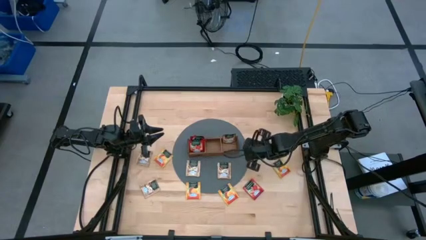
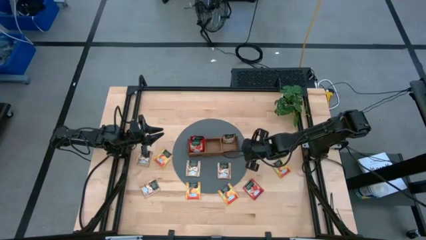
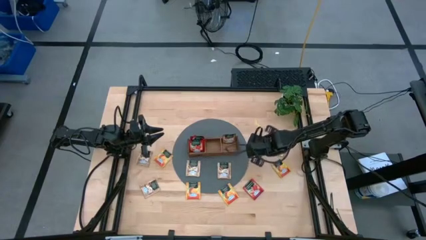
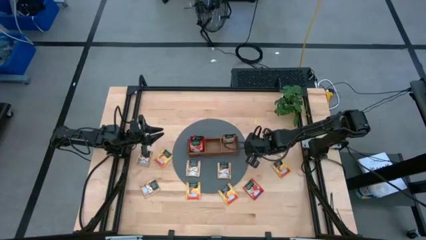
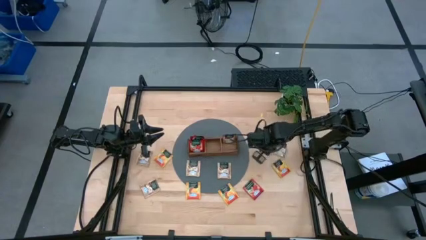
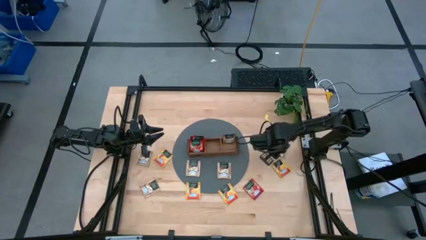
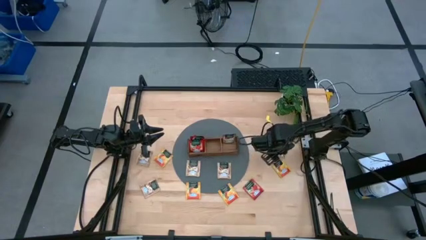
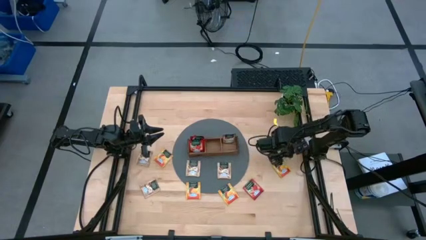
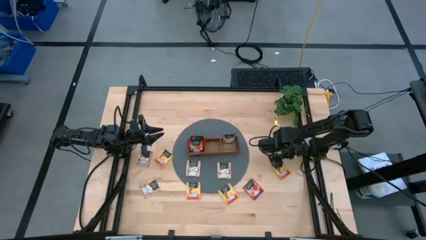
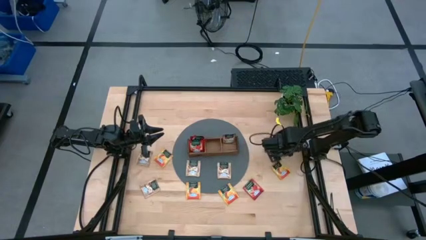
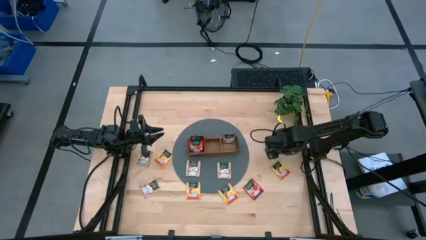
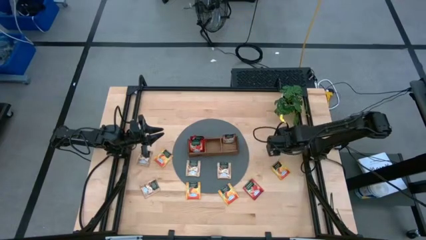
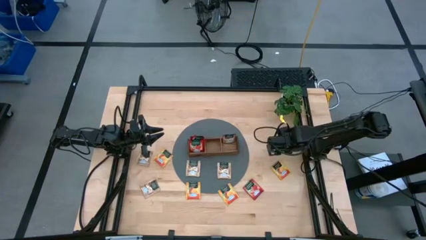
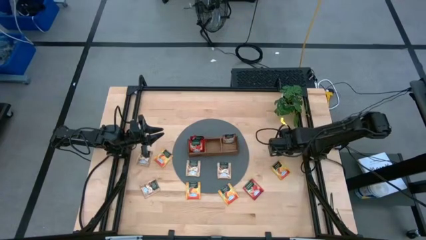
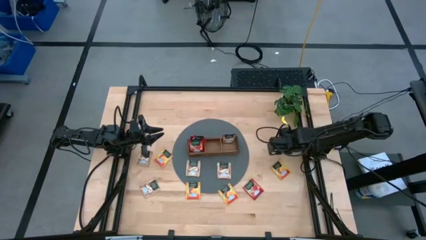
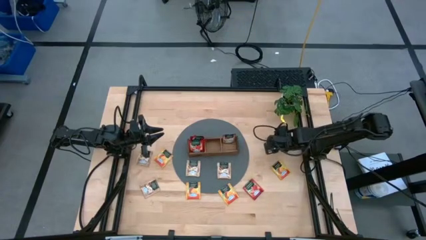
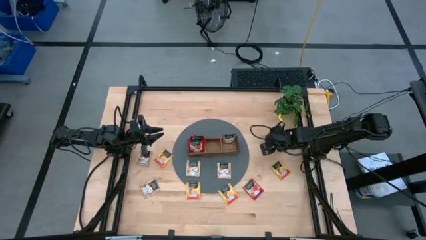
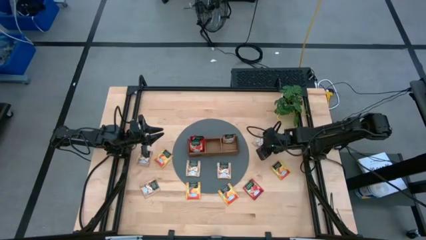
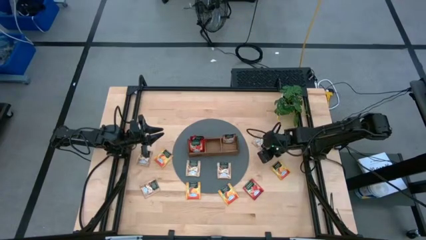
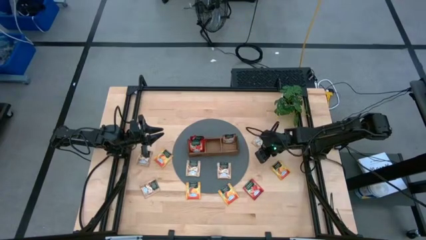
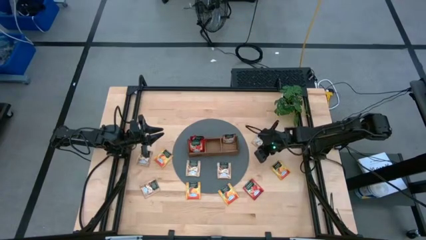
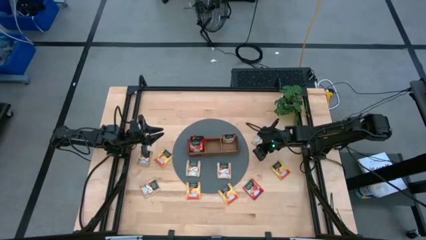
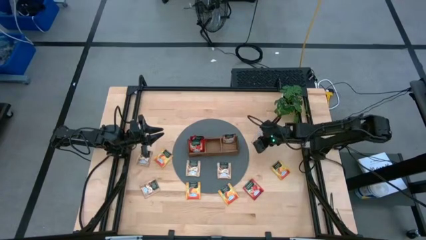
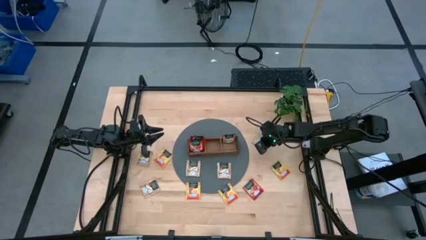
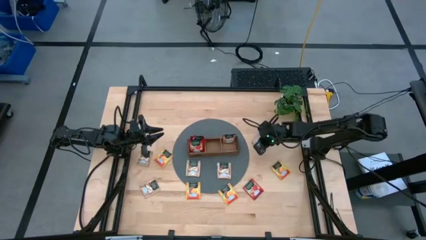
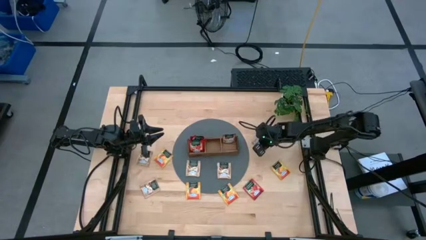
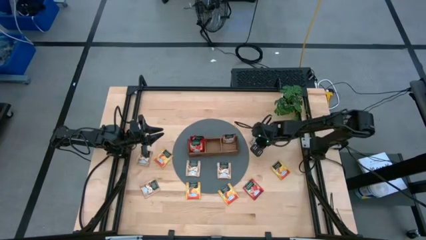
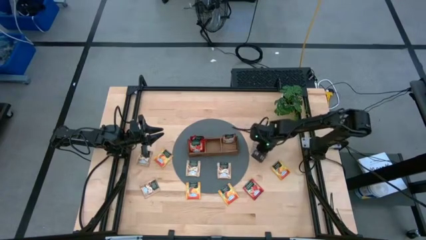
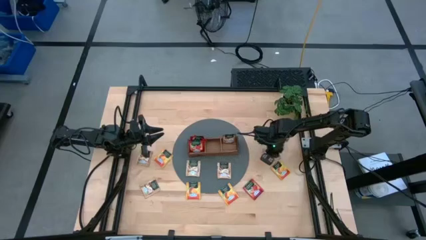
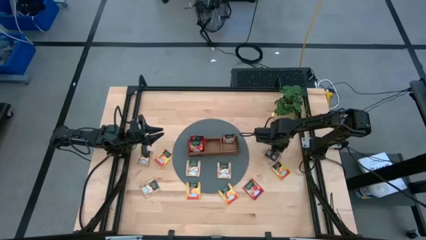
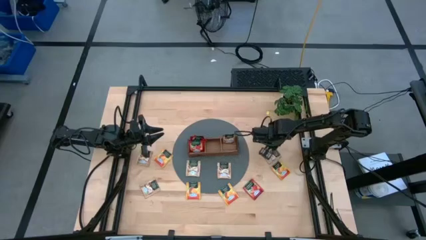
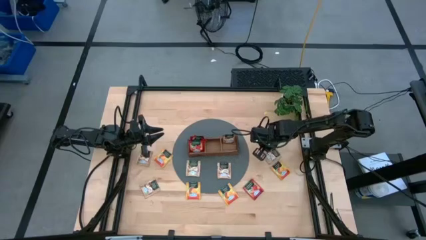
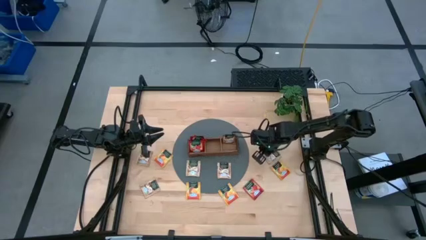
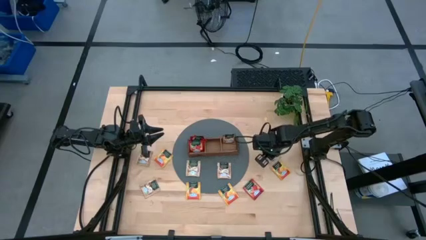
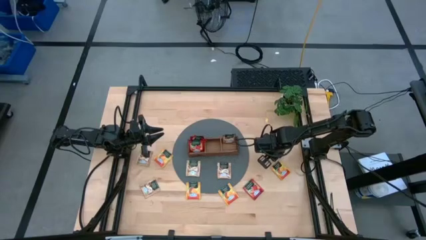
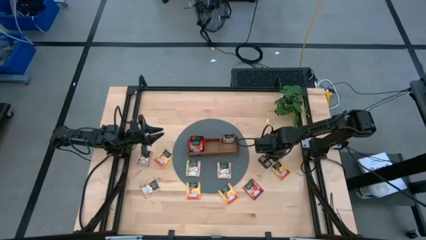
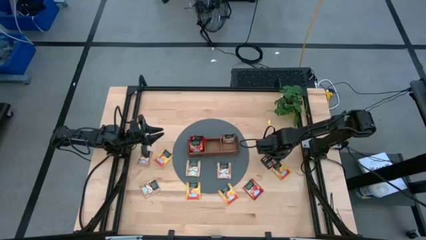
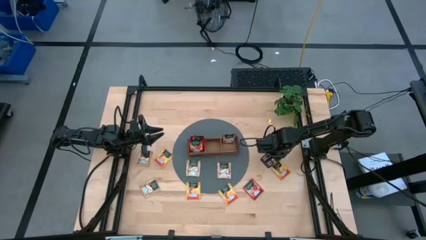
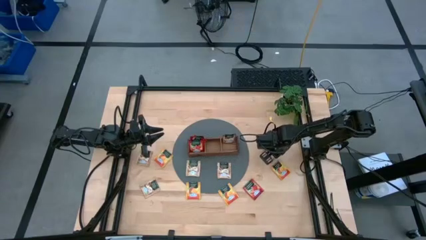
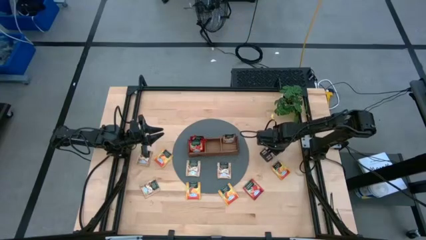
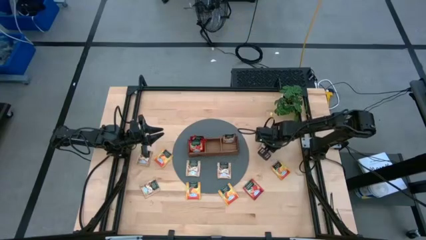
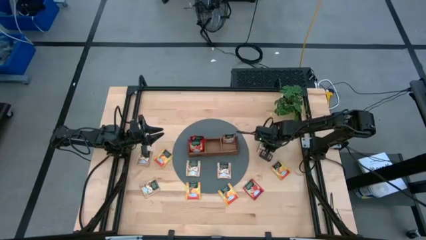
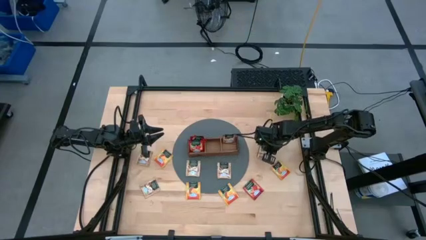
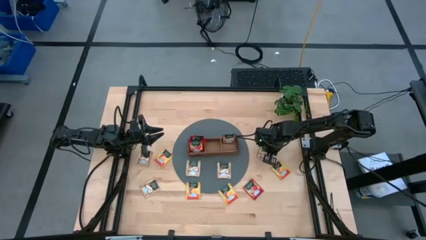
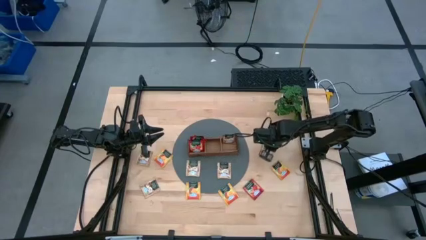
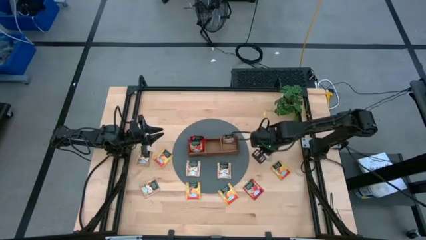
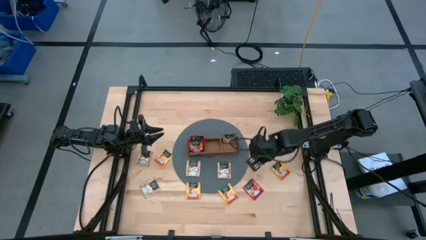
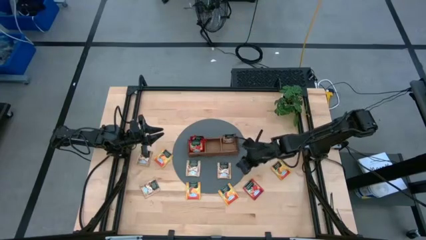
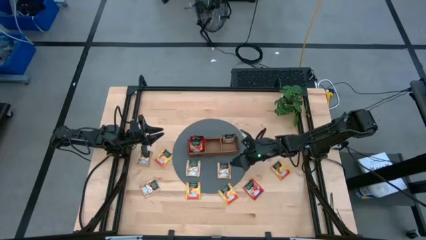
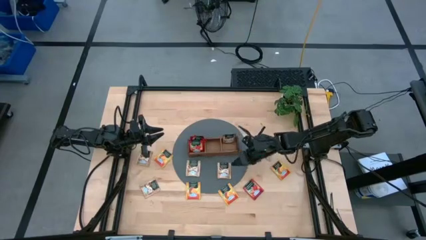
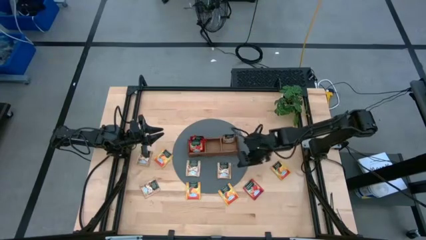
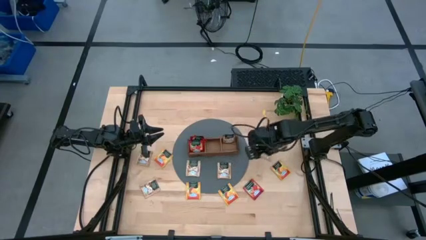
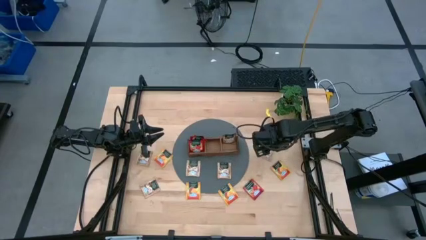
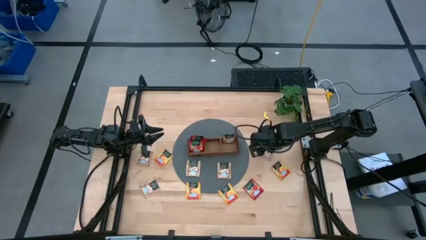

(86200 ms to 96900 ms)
Task: Pick & Place Tea
Put the yellow tea bag into the right section of the wooden organizer

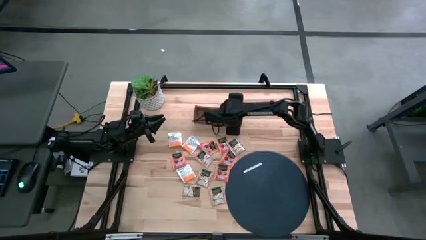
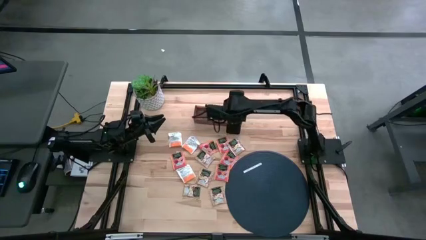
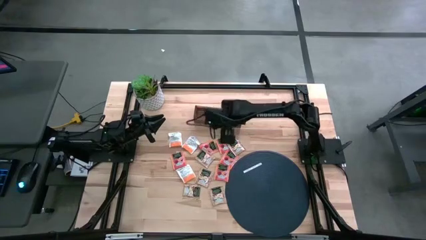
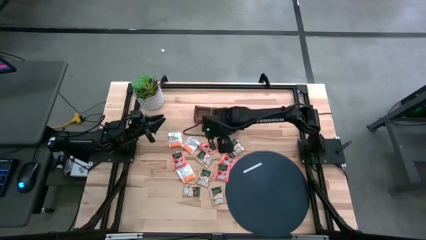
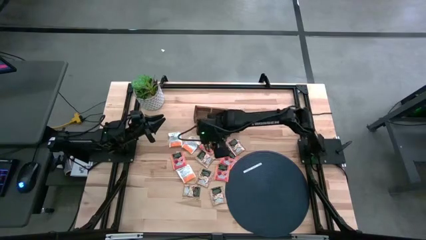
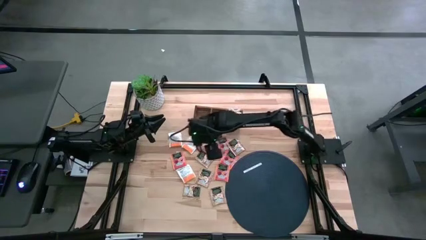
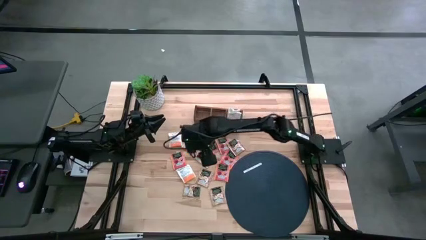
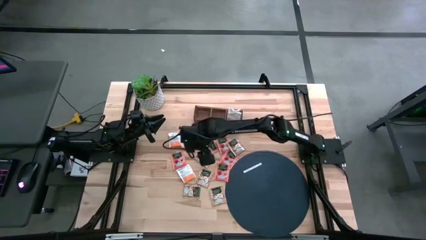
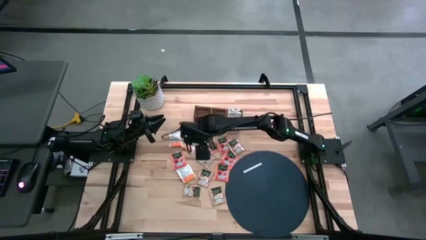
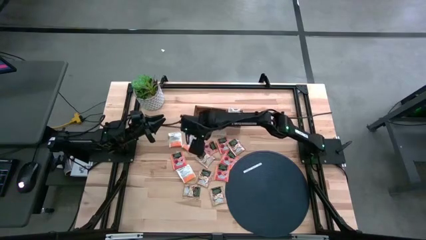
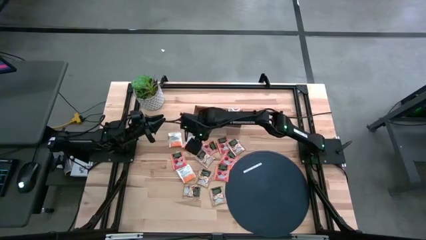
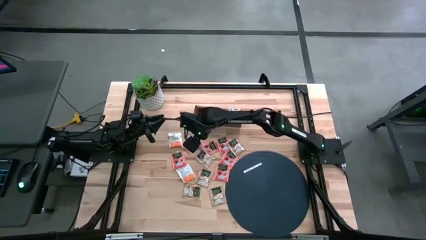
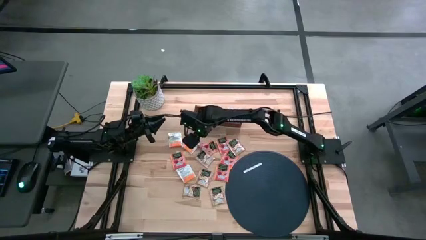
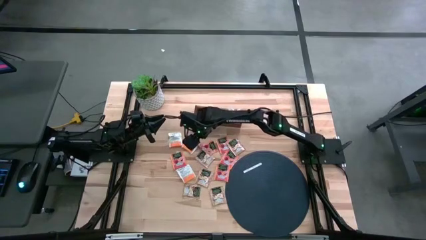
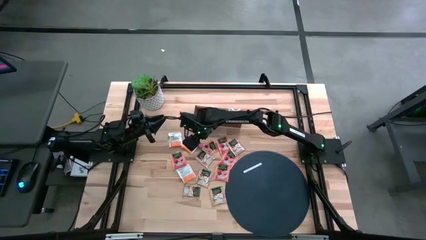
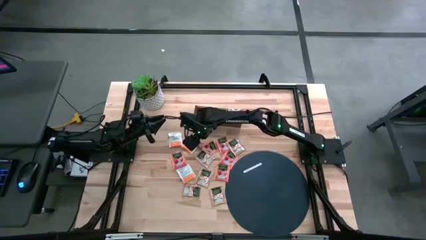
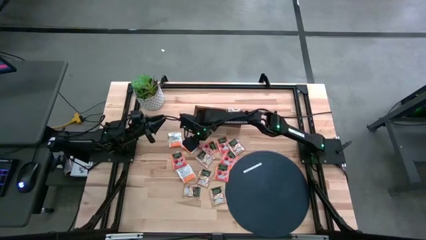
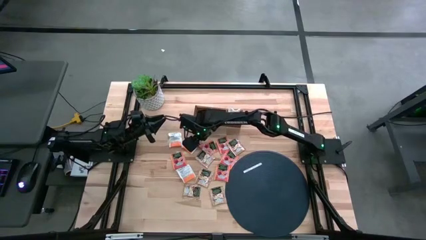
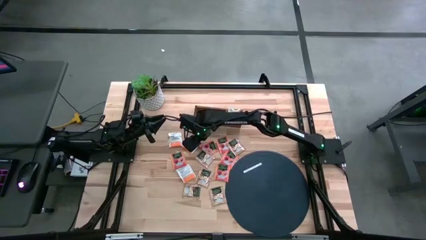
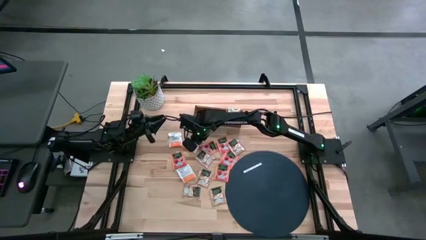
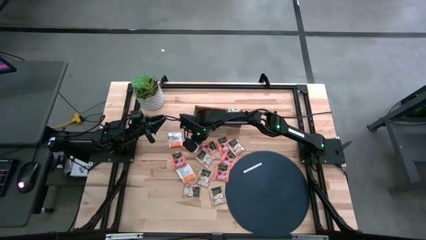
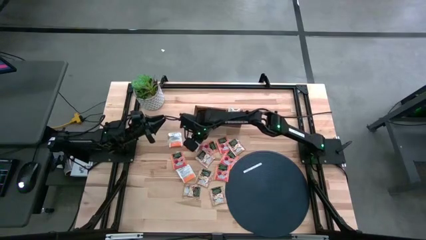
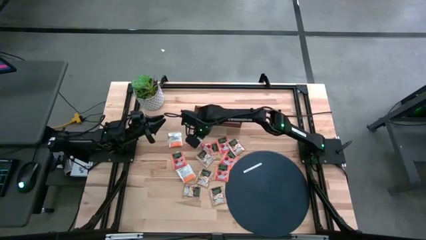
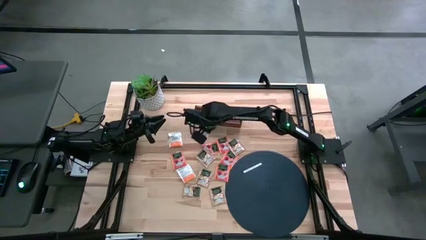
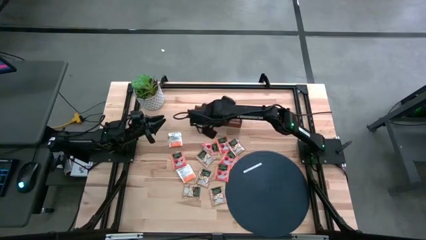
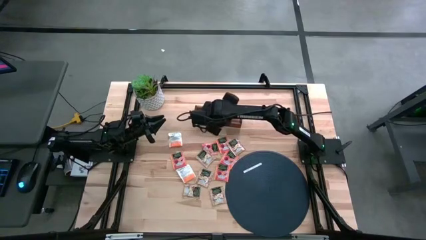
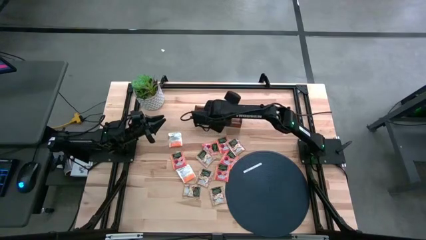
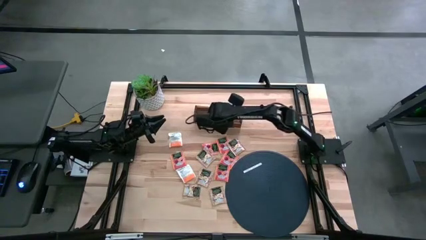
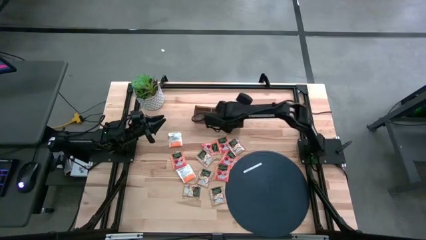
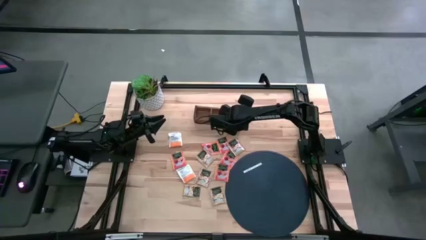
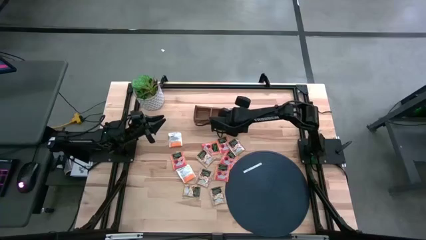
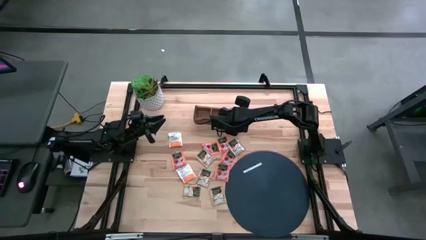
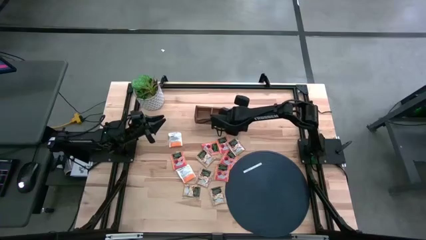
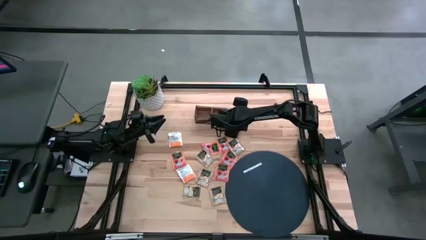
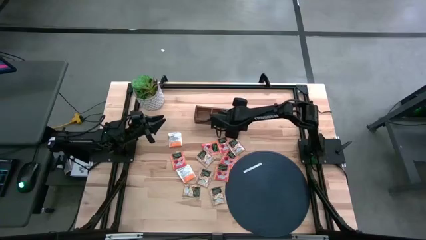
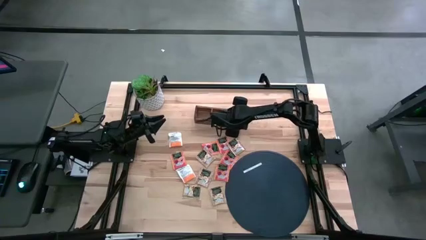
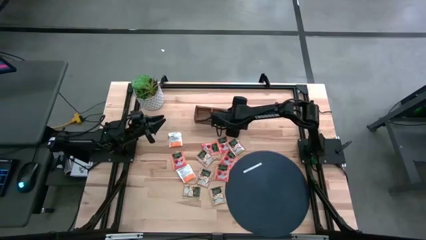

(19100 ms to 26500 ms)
Task: Pick & Place Tea
Put the white orange tea sachet into the right section of the wooden organizer
